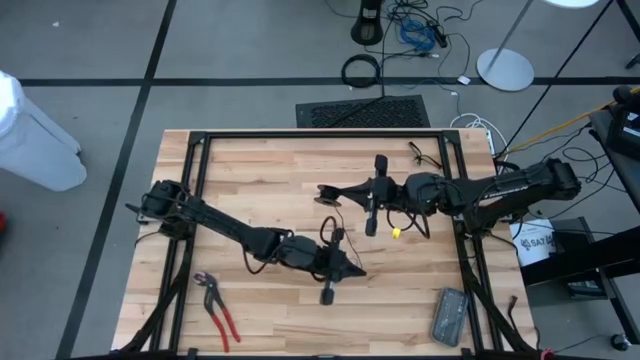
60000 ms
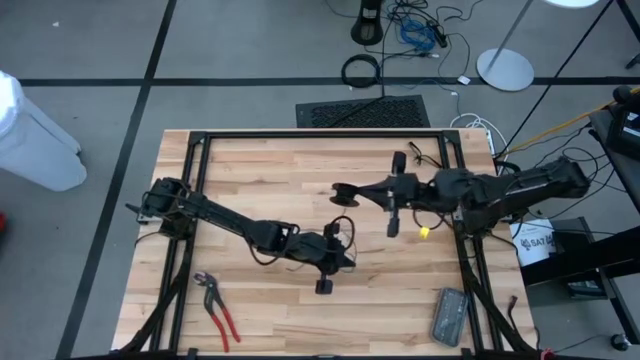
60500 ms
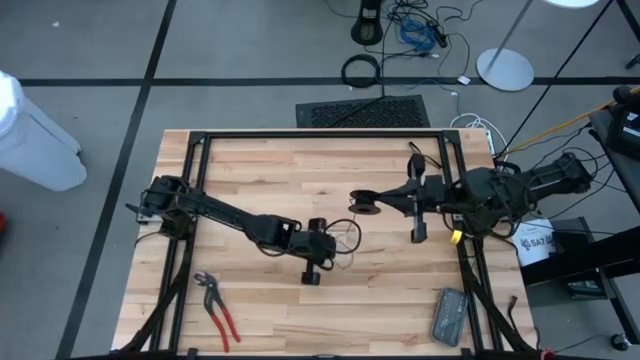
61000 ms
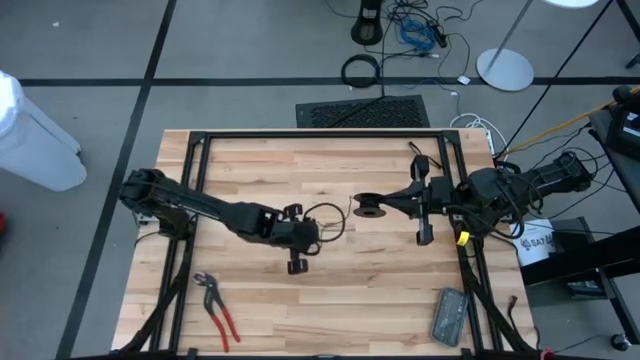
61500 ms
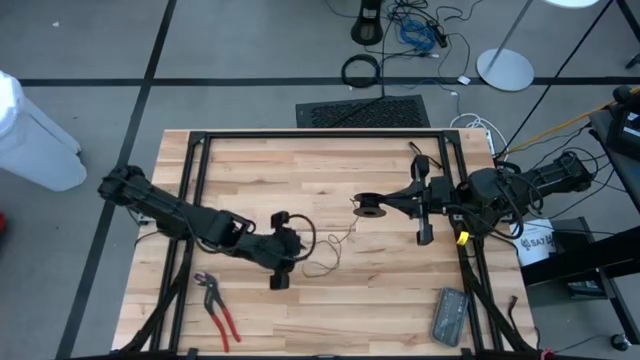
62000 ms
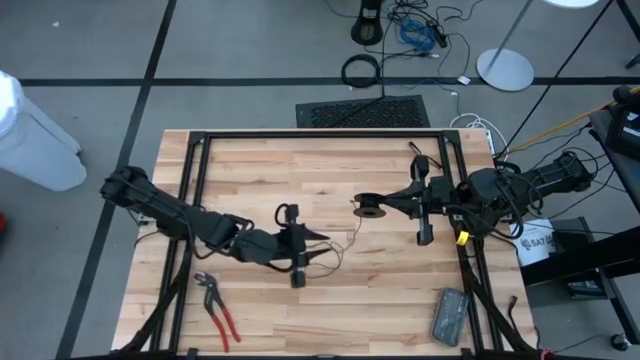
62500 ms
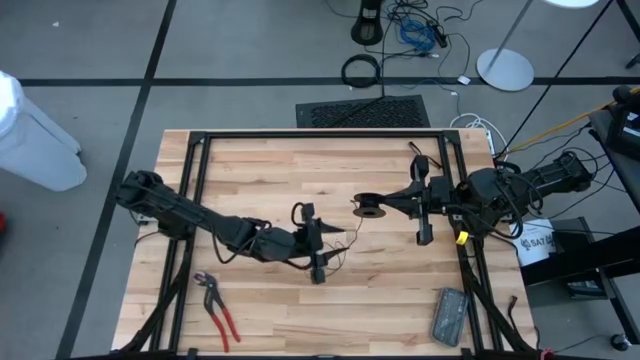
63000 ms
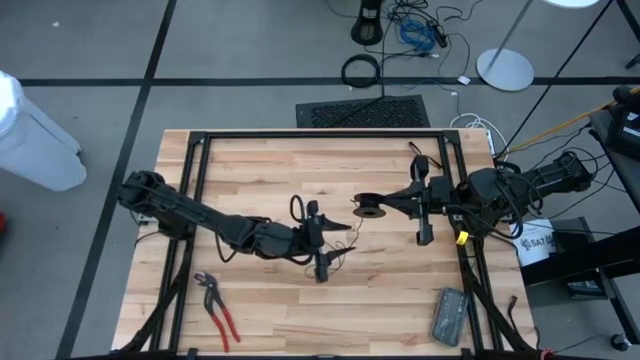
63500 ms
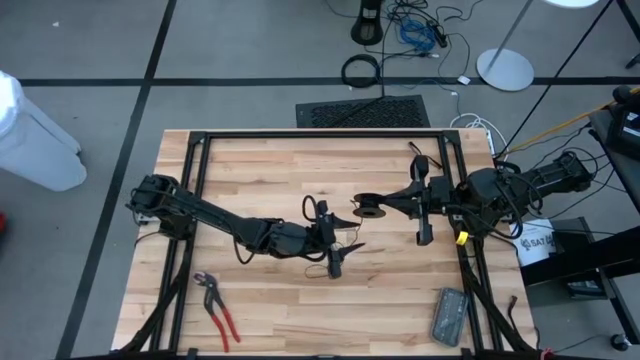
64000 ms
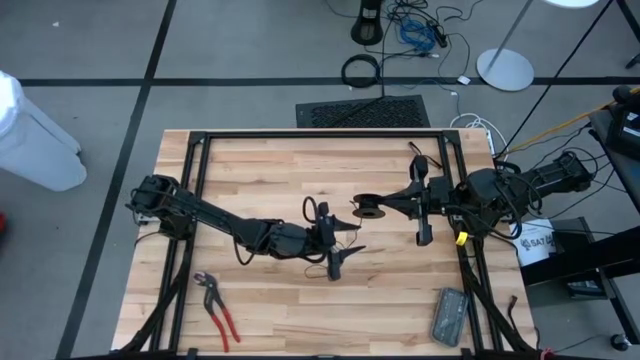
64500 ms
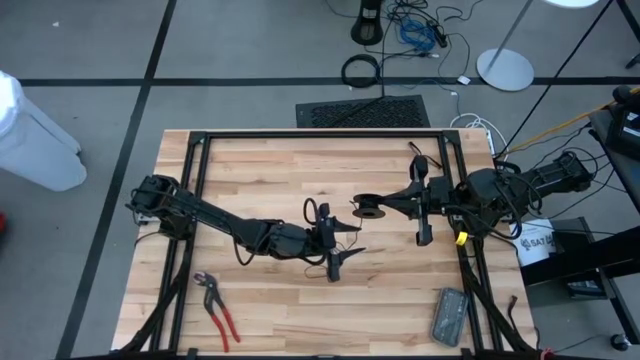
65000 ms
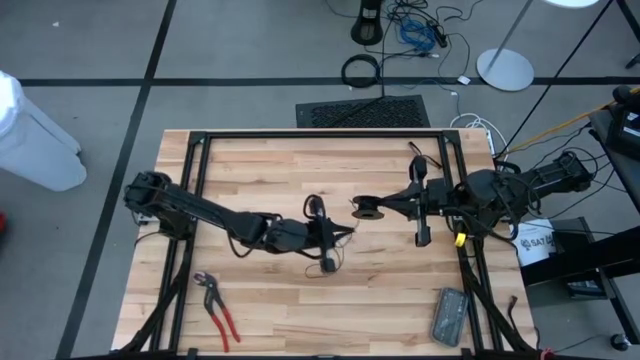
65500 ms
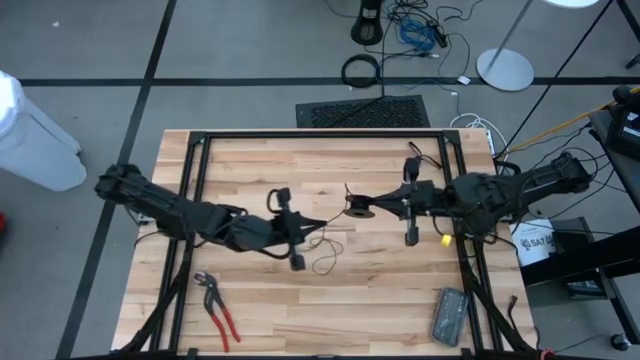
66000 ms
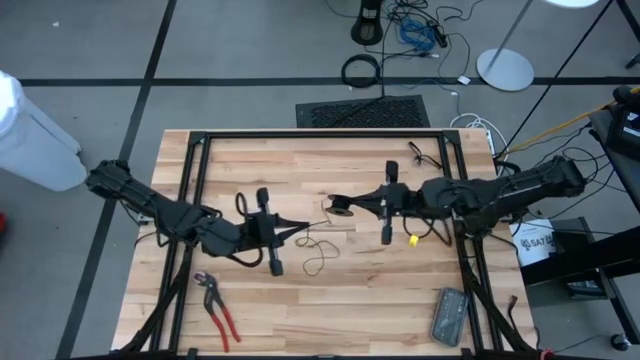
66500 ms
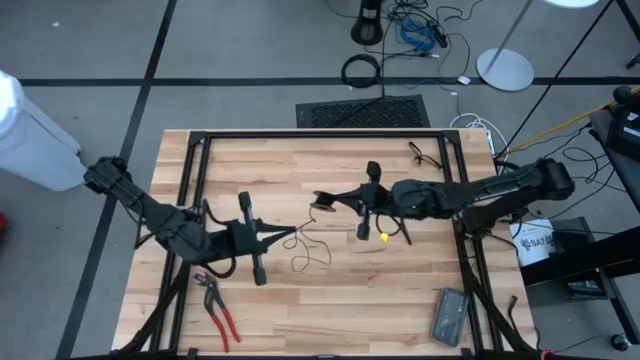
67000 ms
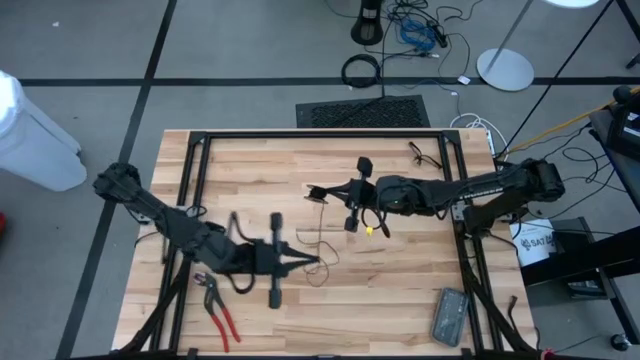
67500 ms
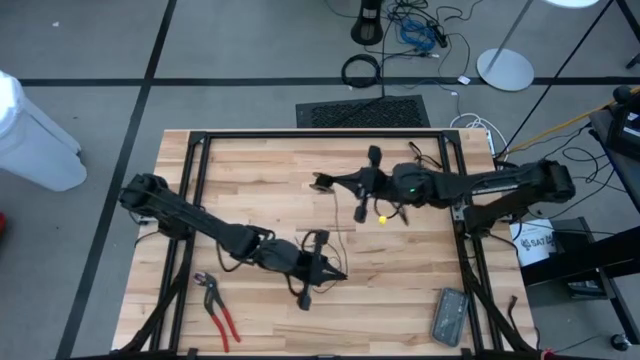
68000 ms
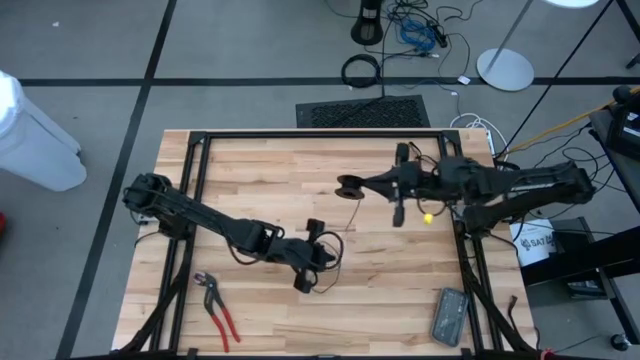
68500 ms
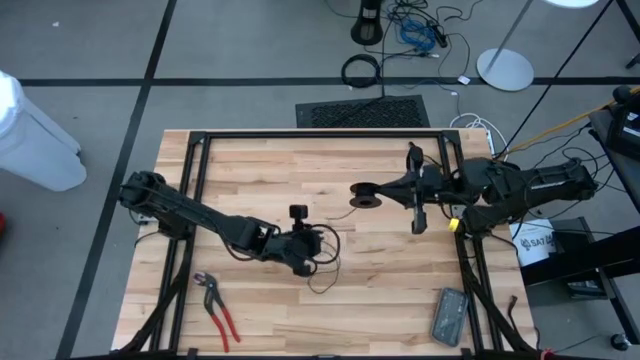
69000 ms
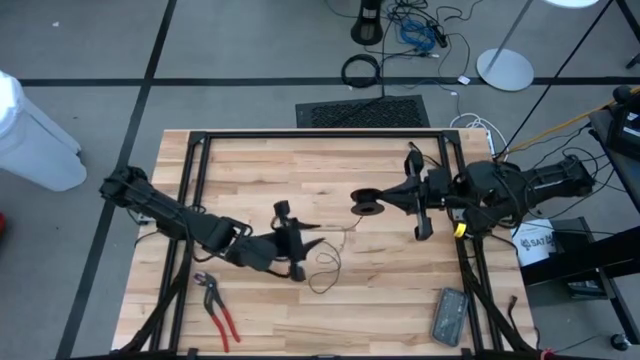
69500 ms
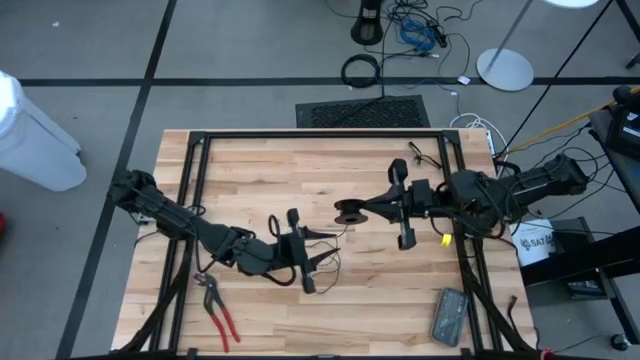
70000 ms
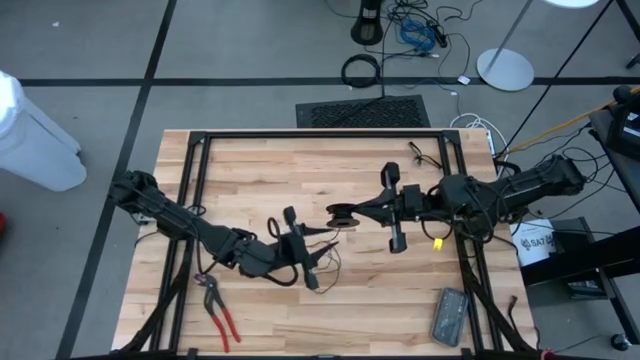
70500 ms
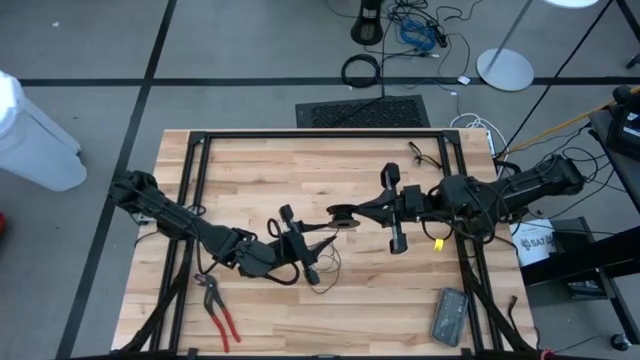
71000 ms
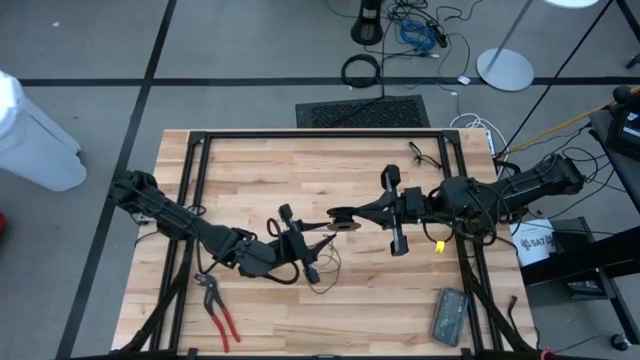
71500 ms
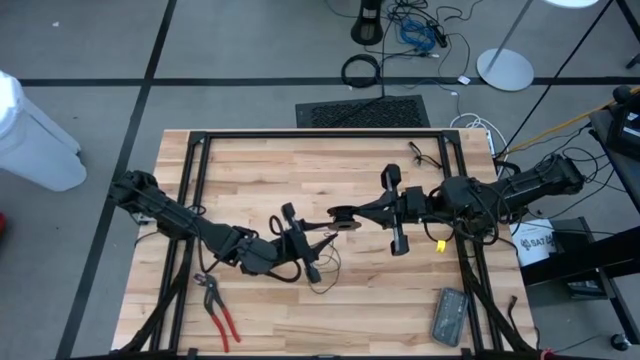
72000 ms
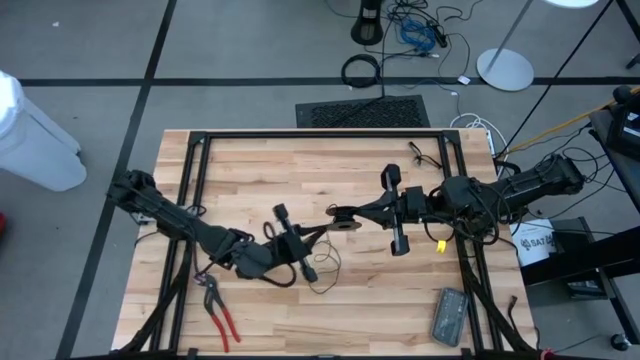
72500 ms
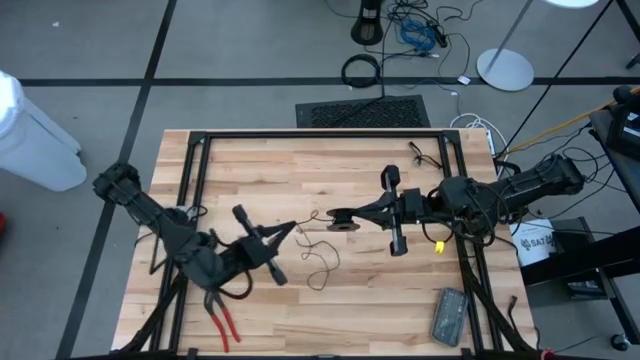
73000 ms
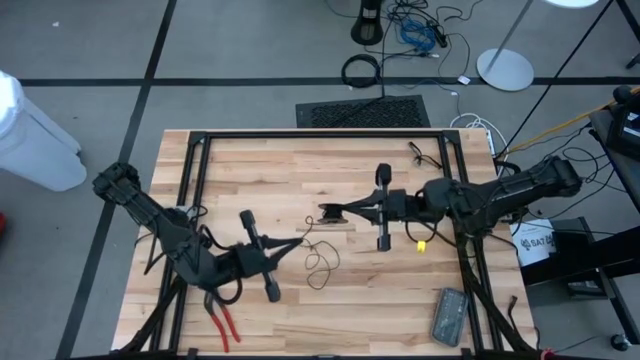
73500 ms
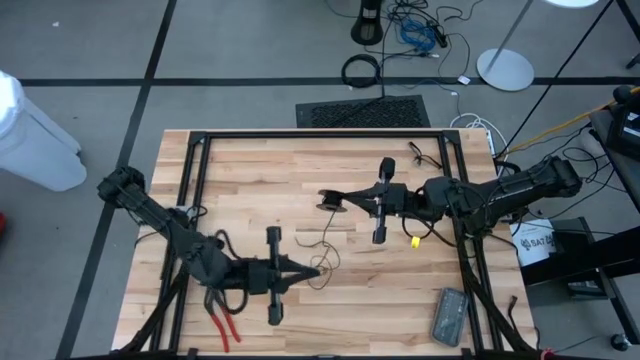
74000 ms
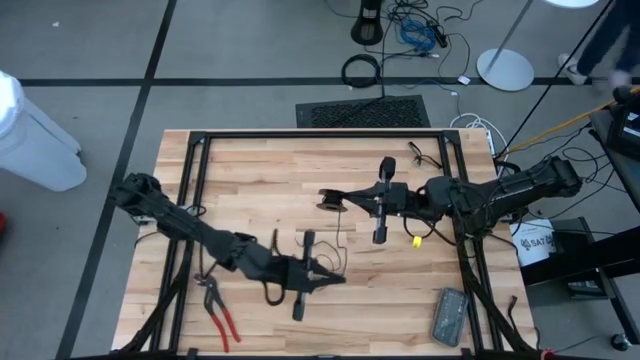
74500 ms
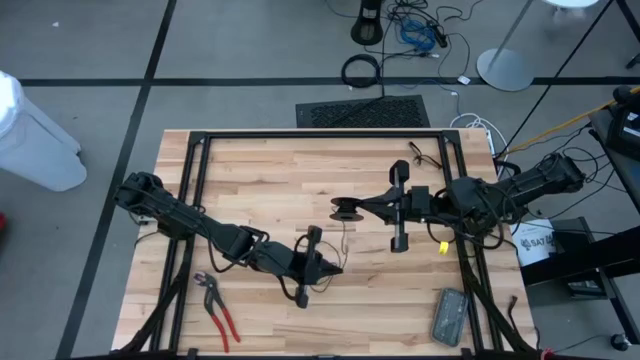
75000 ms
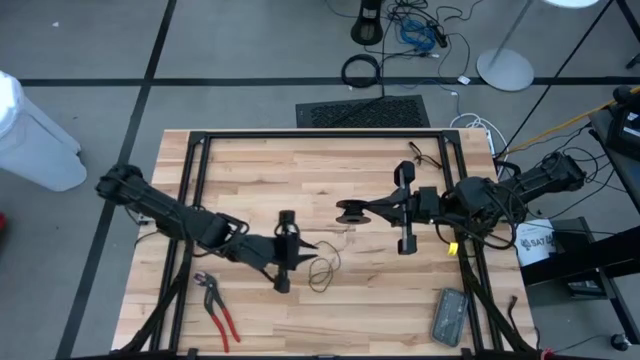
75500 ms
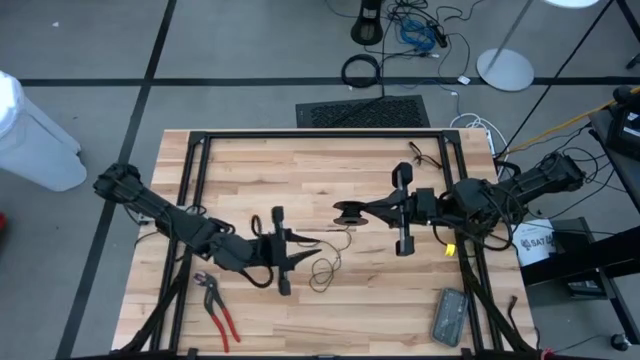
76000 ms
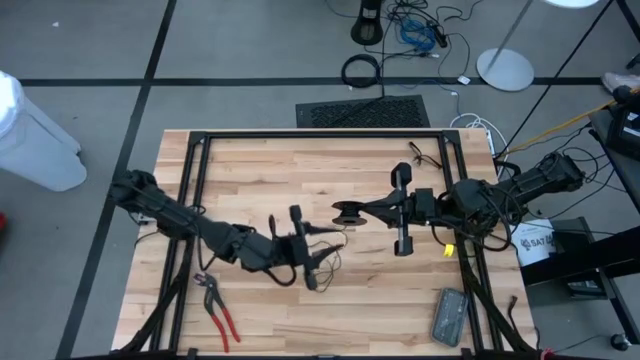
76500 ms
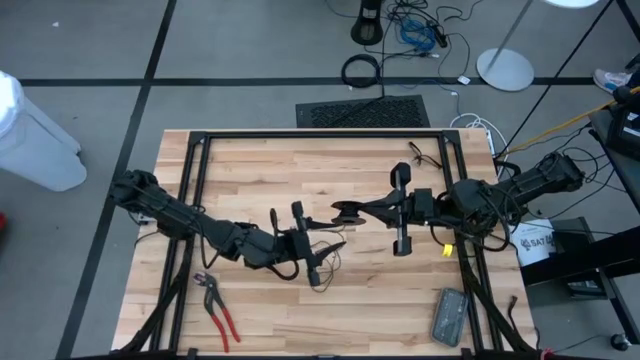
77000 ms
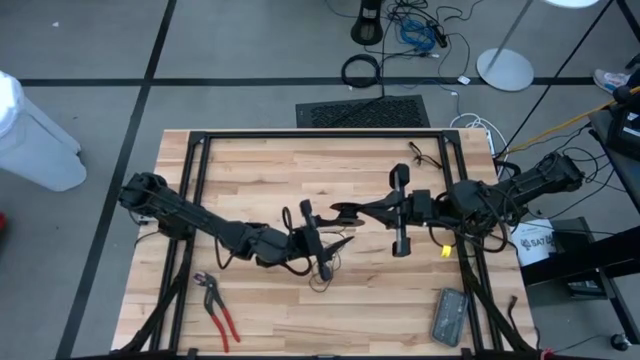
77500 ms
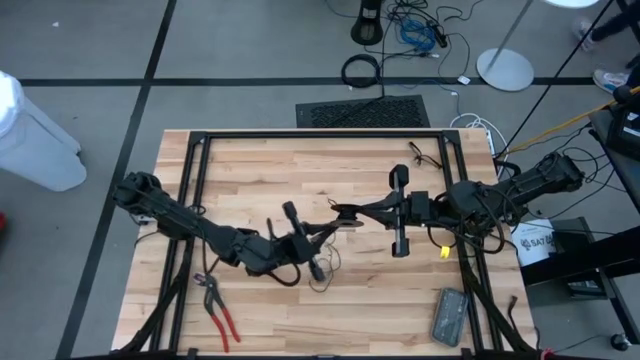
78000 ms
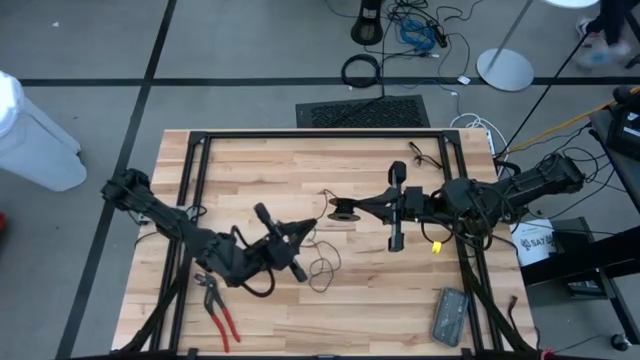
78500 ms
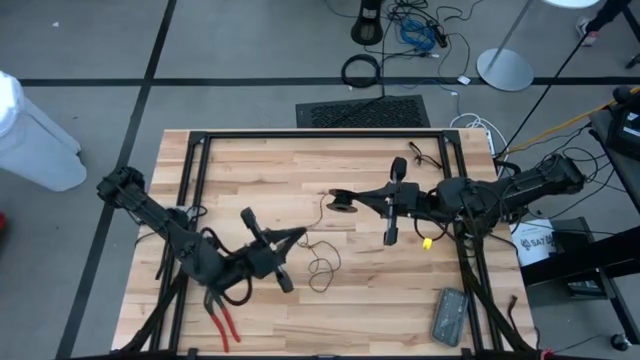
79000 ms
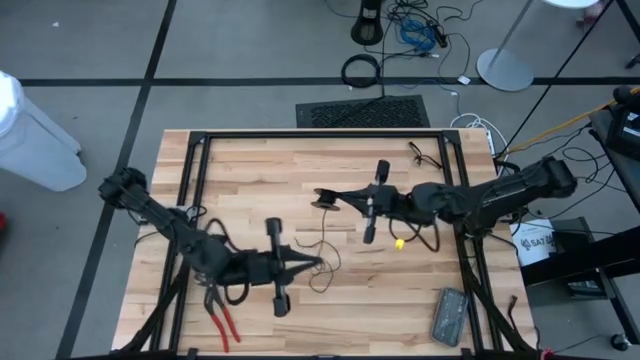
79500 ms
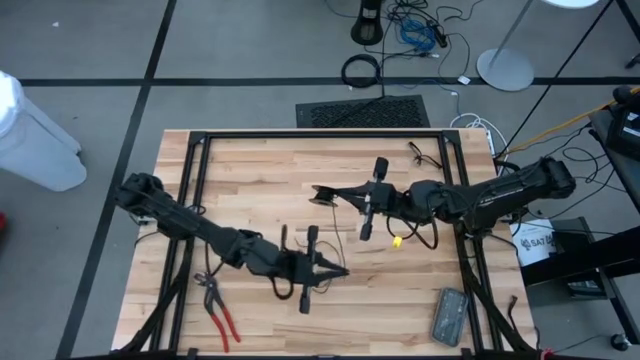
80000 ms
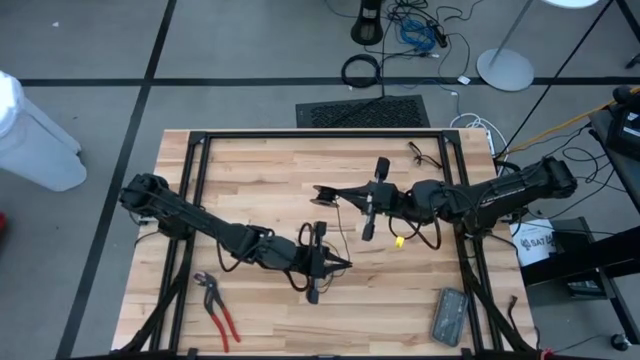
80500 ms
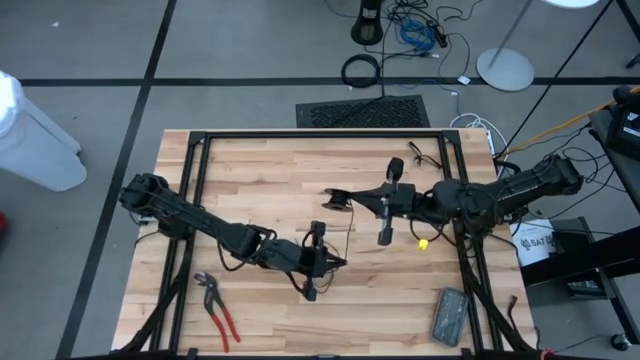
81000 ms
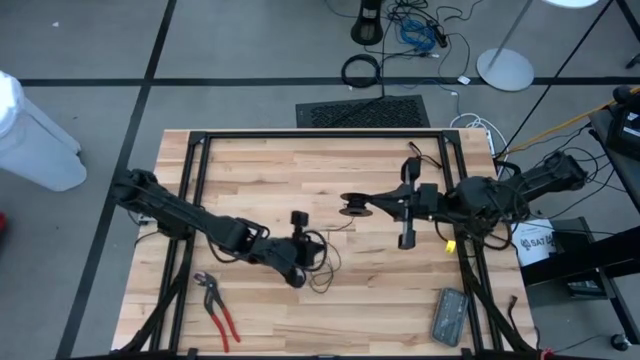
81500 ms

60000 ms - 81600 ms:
Task: Coil cords
Uncoil the black wire from the black spool
